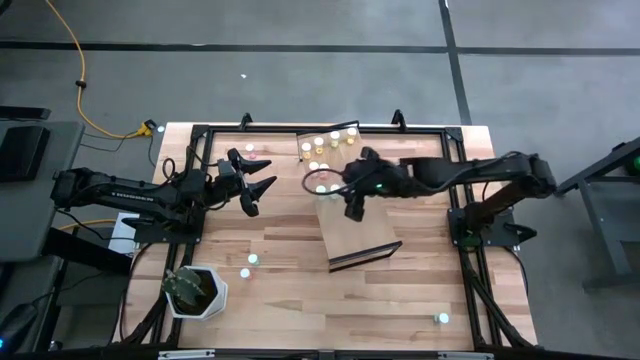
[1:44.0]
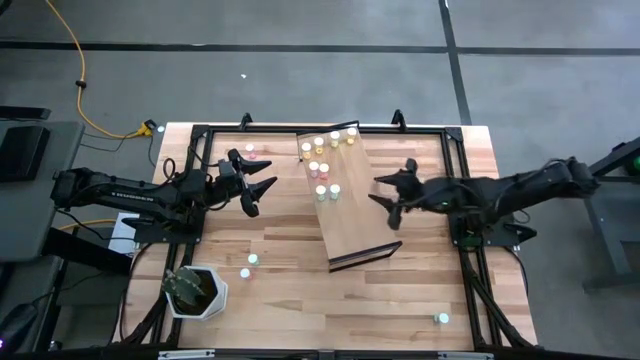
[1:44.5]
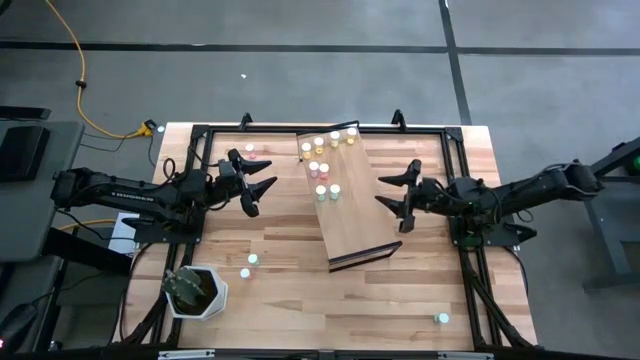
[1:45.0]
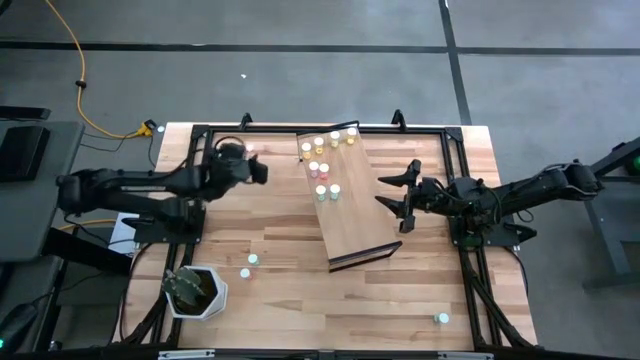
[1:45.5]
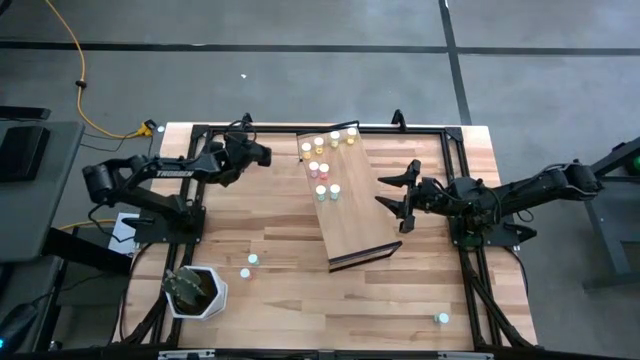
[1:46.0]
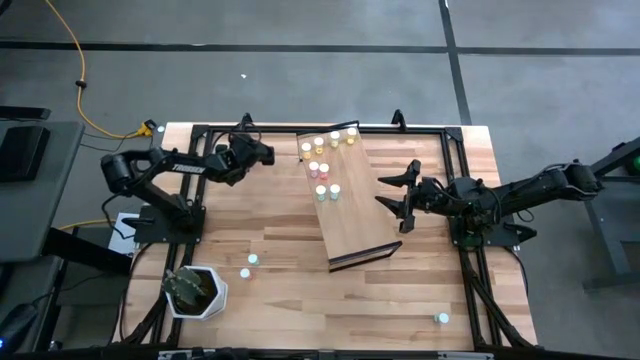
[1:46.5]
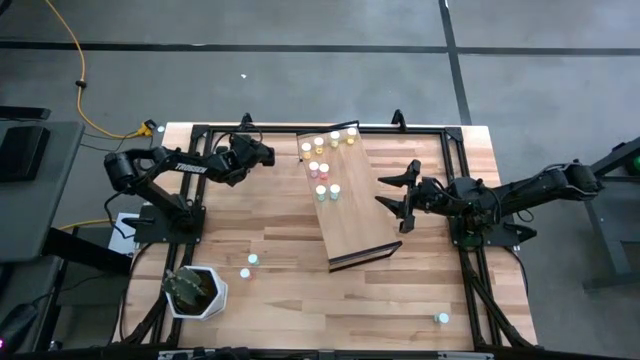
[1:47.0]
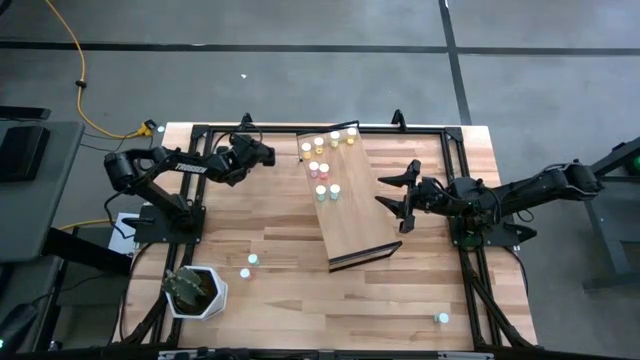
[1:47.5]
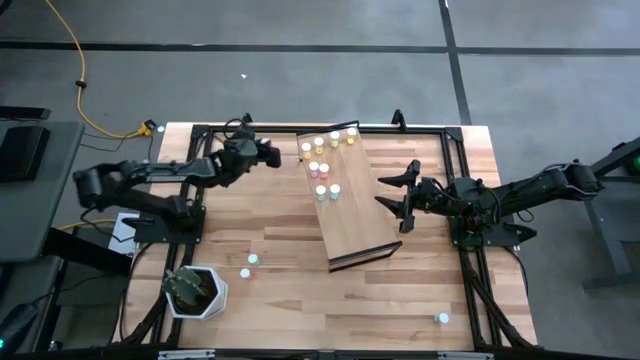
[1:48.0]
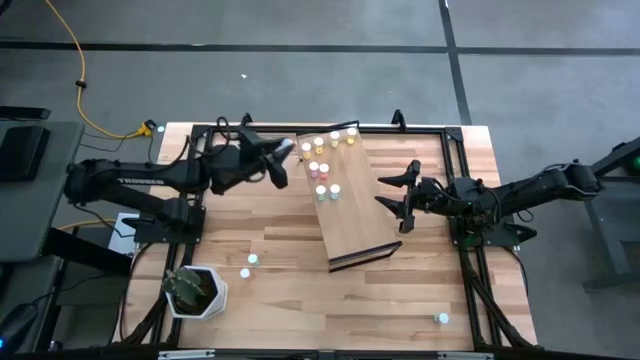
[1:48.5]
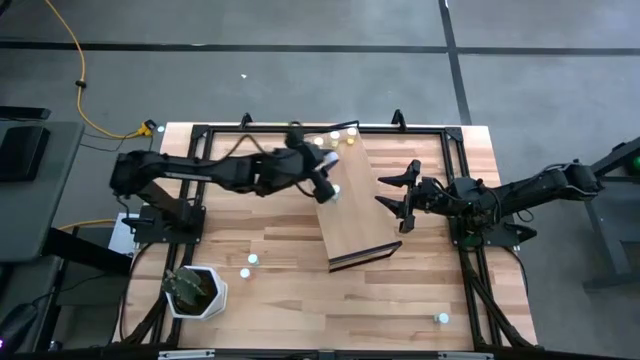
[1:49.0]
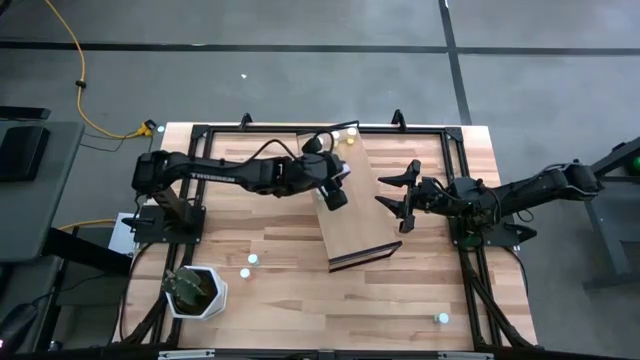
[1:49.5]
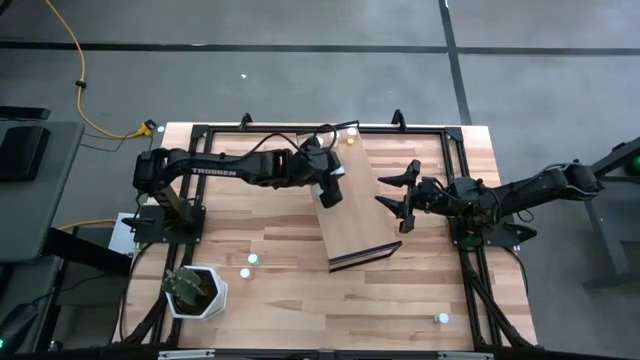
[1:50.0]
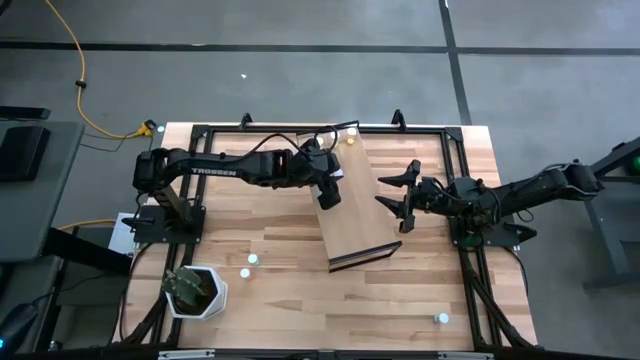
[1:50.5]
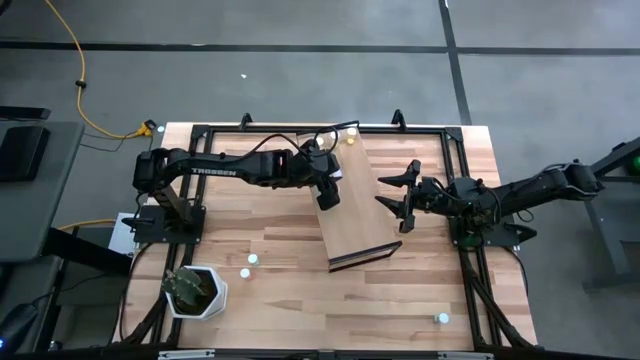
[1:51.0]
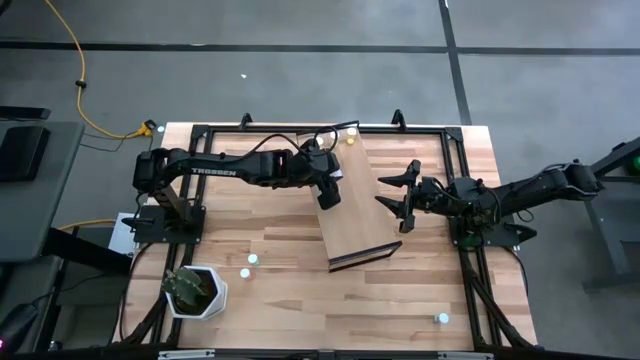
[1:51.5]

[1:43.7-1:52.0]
Task: Pick and place medicine bottles onto shelf by color
Put the purple pill bottle on the shelf

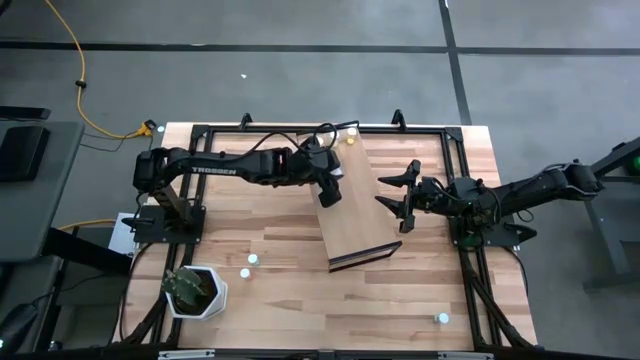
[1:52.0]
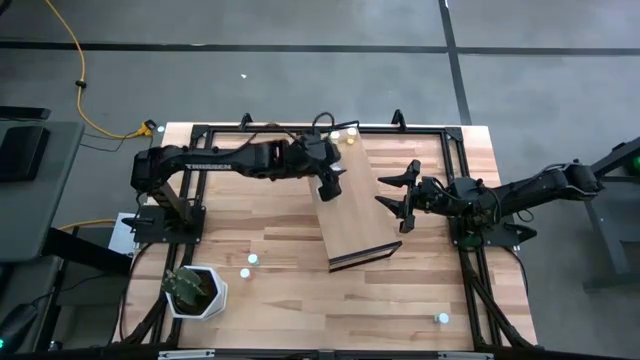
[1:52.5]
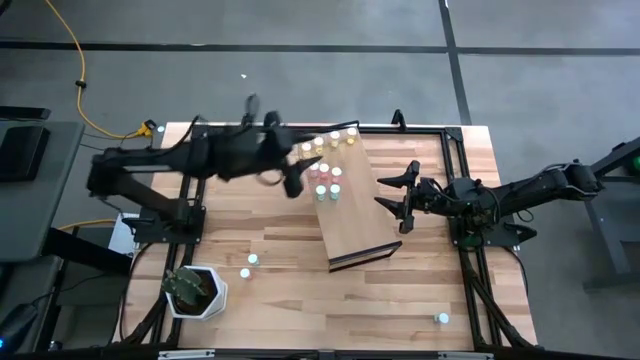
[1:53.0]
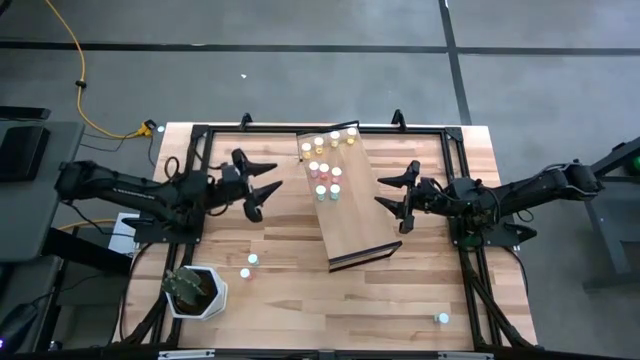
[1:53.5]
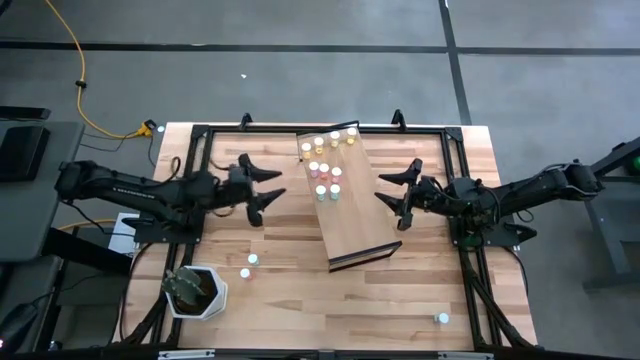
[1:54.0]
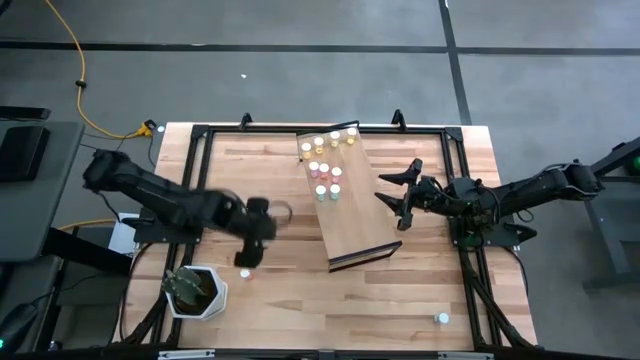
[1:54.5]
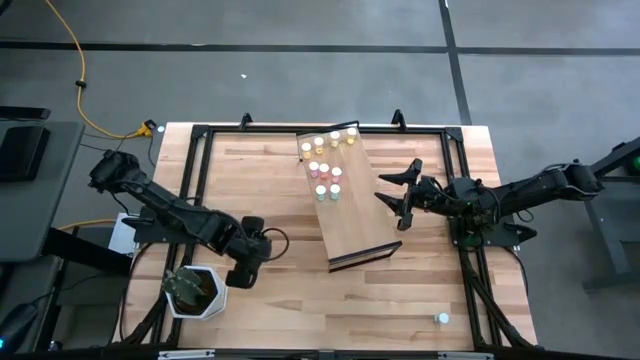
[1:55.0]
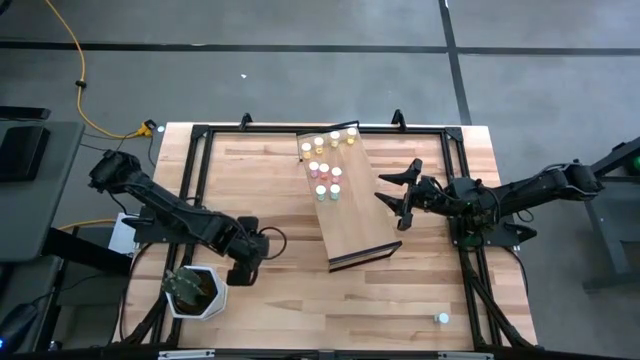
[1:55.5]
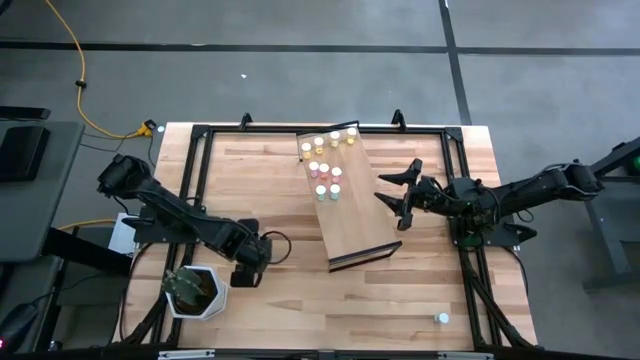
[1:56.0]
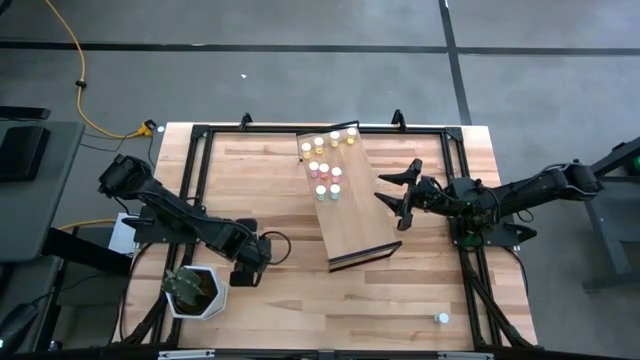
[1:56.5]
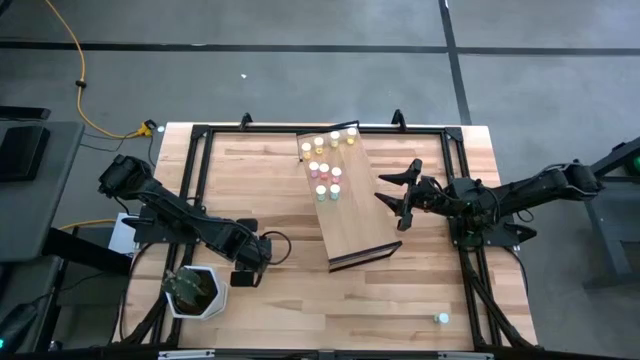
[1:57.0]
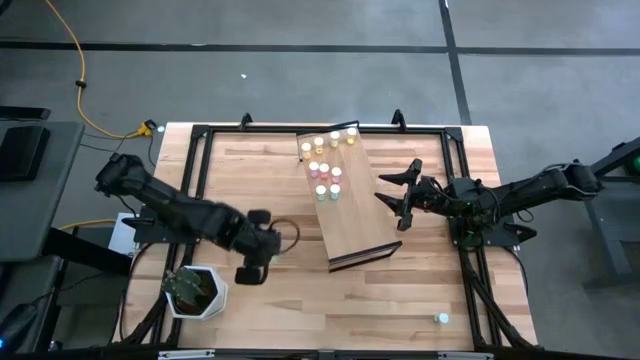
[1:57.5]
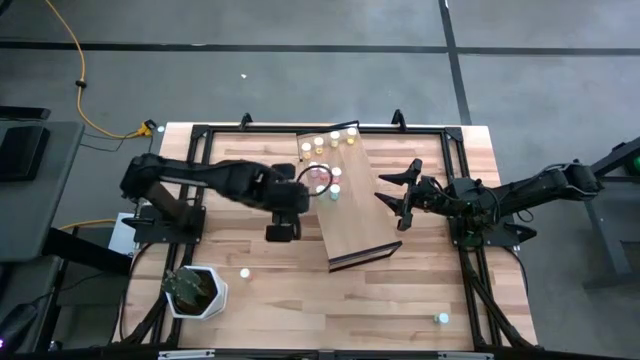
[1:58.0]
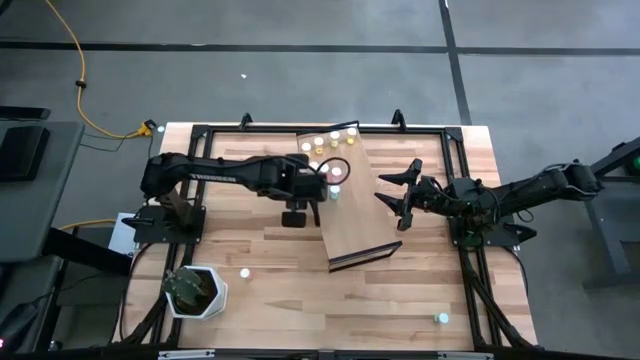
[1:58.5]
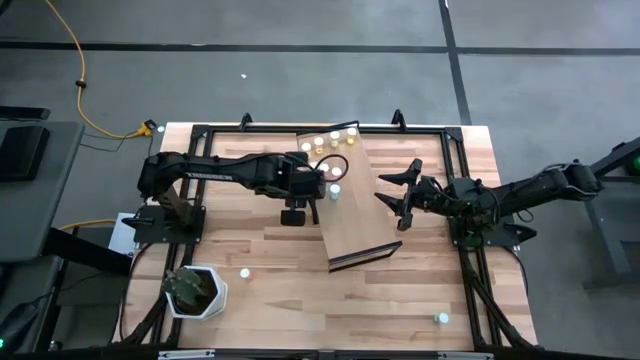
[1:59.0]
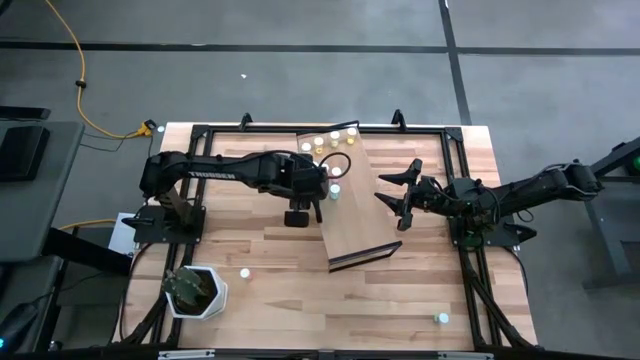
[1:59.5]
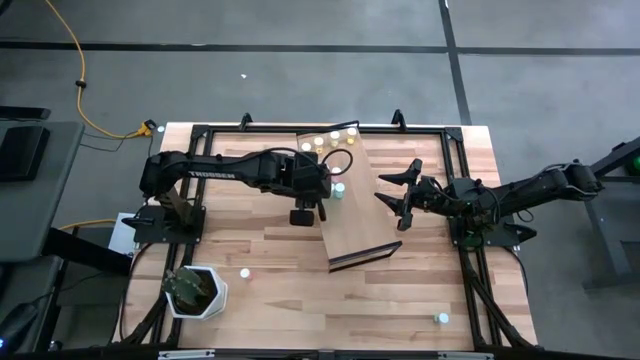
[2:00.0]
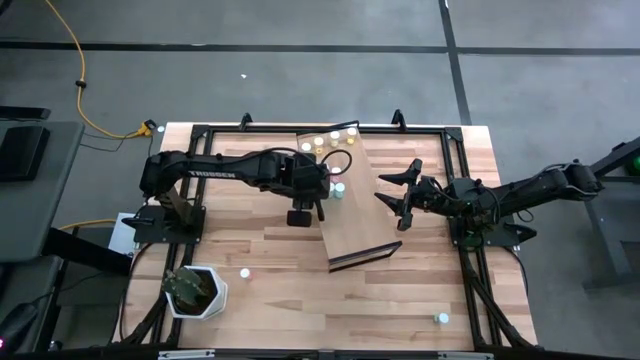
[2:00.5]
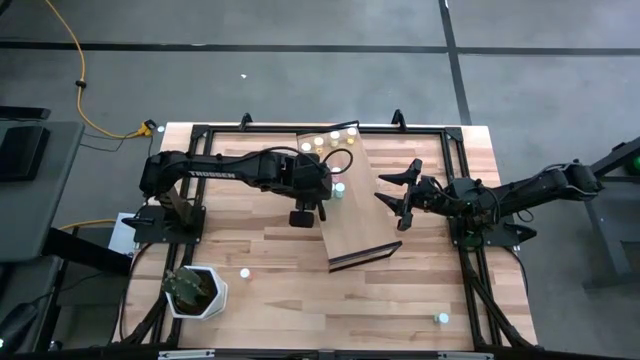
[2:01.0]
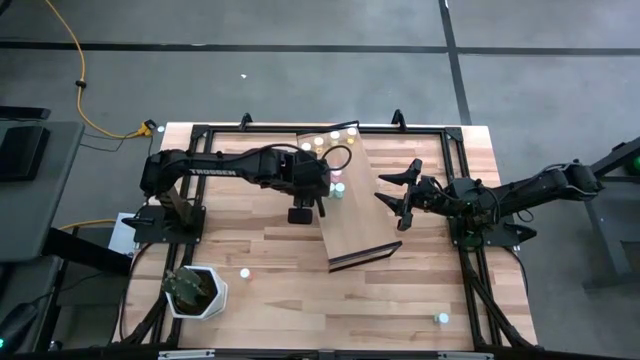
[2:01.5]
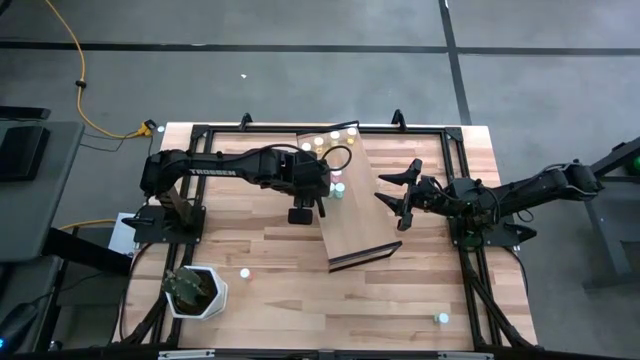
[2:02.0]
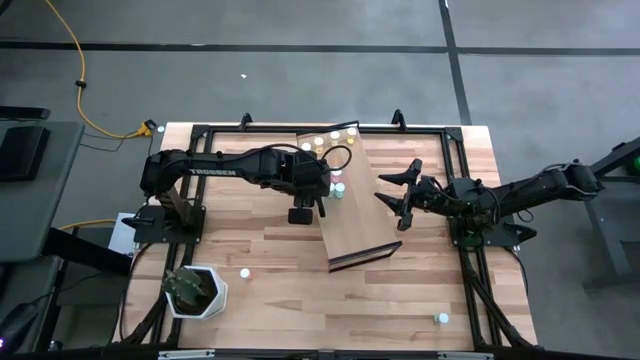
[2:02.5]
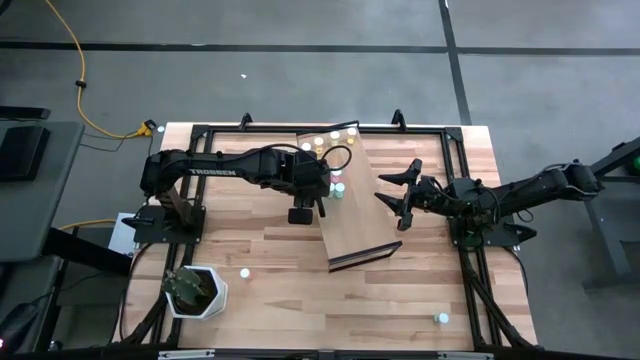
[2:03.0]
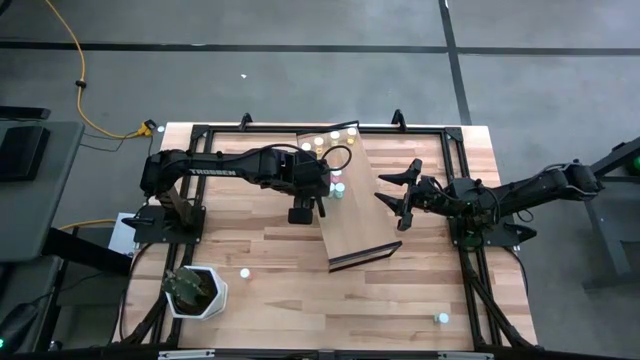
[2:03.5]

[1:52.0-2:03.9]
Put the blue pill bottle on the shelf aligned with the other blue pill bottles

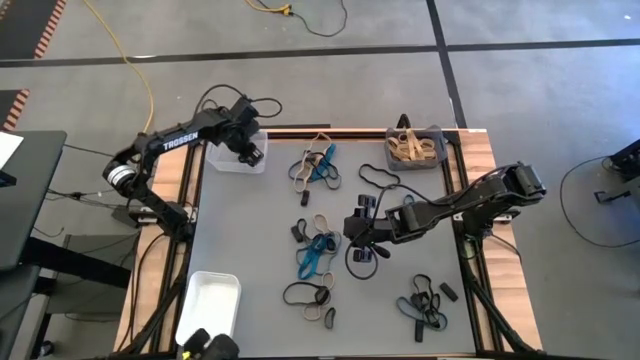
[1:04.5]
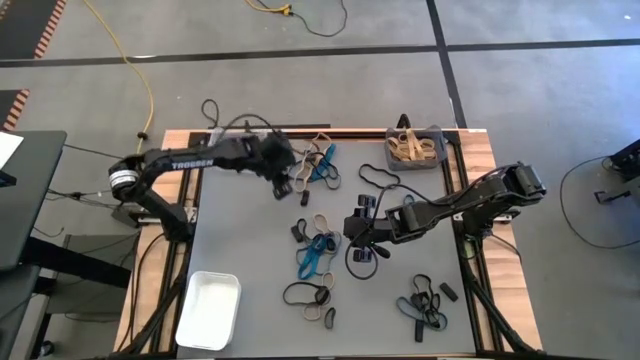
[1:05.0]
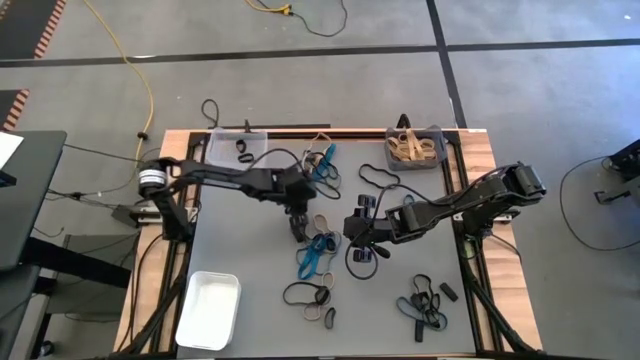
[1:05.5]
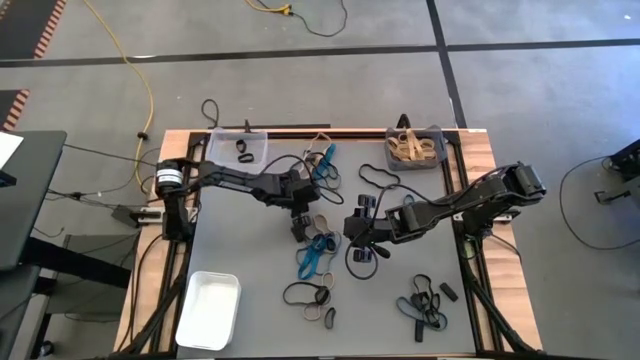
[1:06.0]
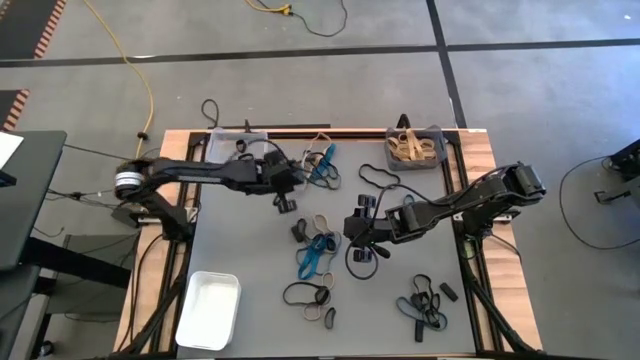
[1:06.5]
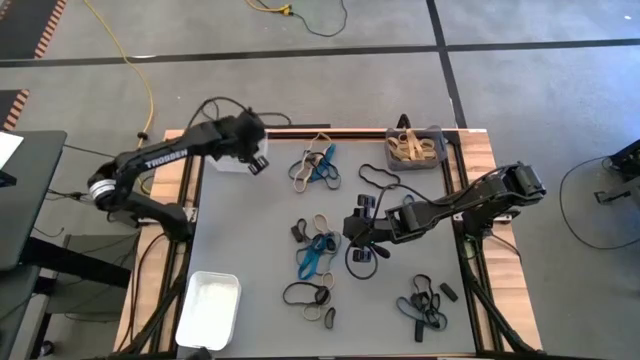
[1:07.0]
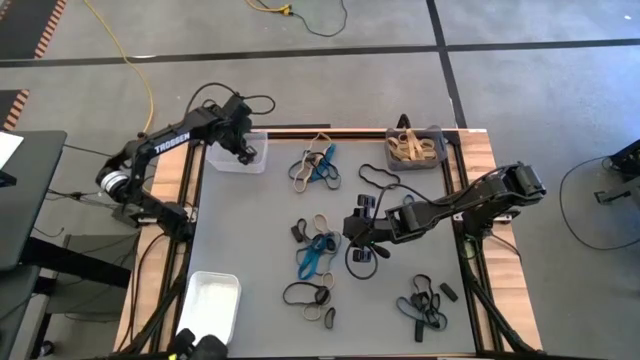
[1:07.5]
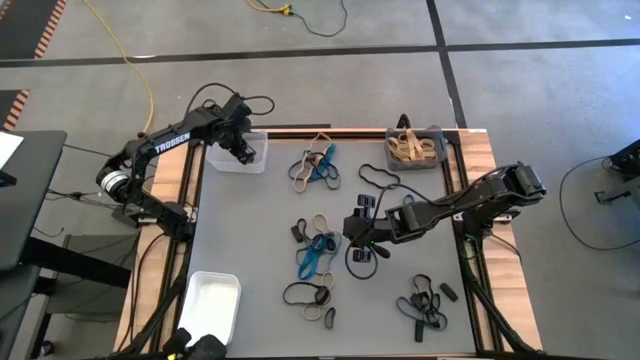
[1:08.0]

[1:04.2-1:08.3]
Task: Sort rubber bands into baskets
Put the black rubber band into the transparent bin
